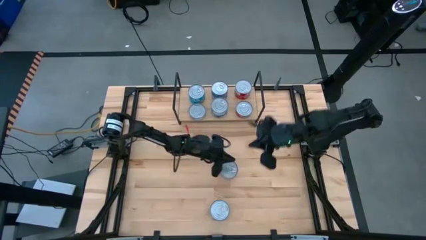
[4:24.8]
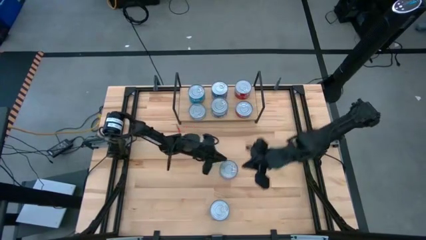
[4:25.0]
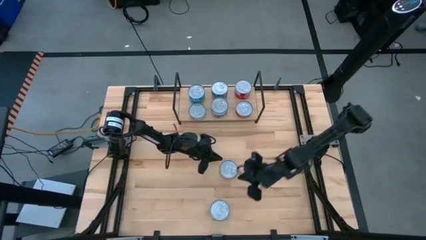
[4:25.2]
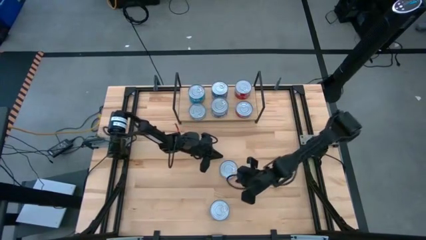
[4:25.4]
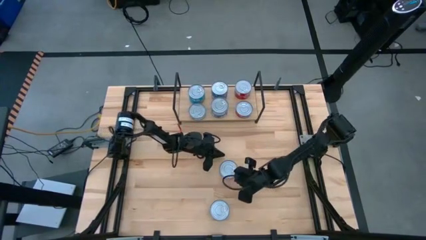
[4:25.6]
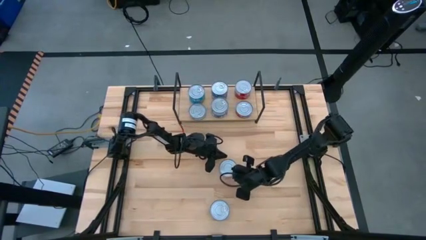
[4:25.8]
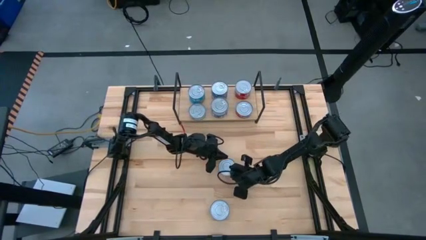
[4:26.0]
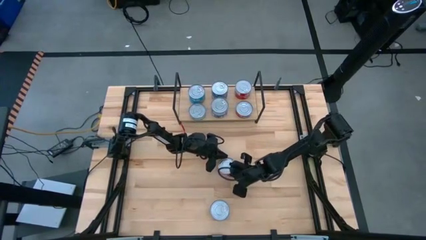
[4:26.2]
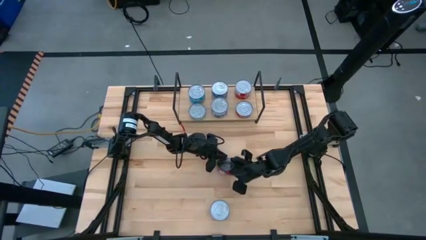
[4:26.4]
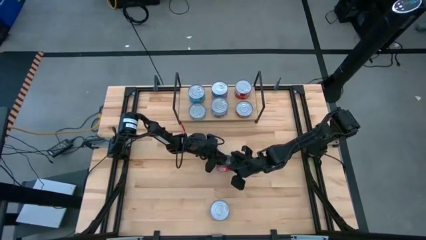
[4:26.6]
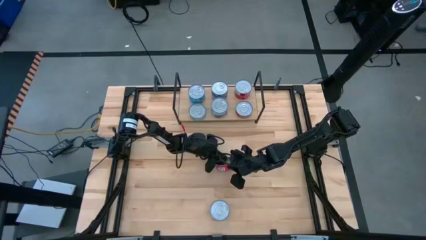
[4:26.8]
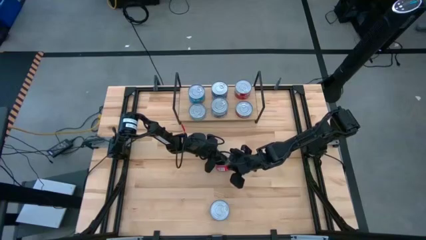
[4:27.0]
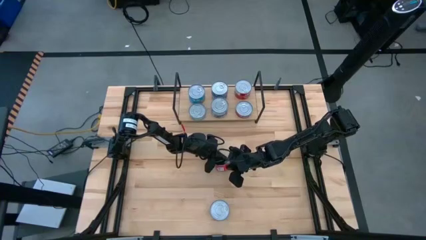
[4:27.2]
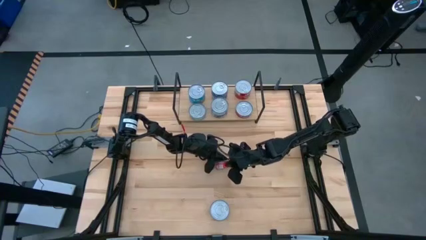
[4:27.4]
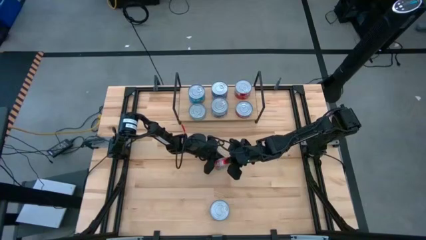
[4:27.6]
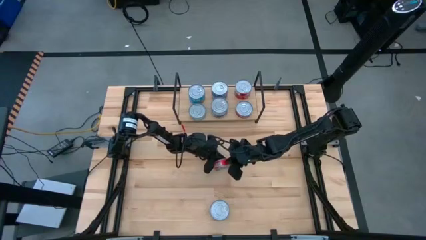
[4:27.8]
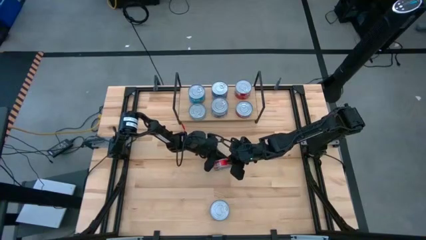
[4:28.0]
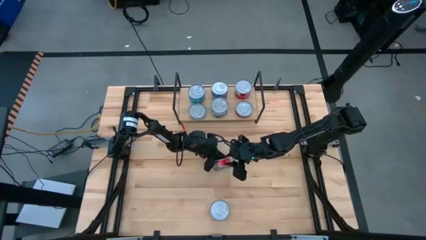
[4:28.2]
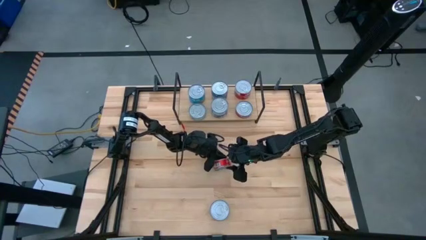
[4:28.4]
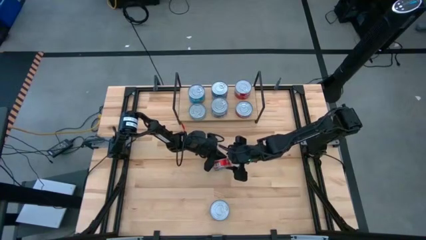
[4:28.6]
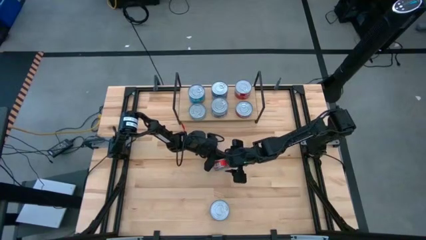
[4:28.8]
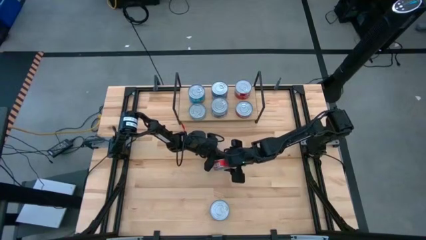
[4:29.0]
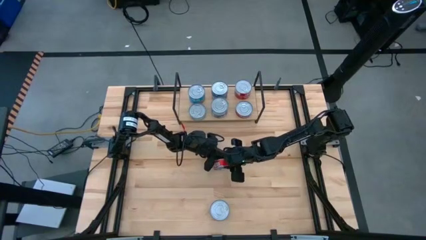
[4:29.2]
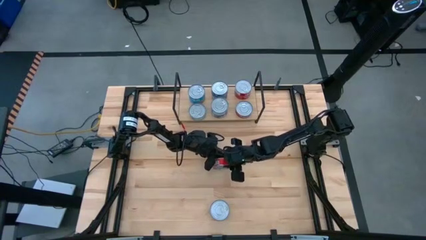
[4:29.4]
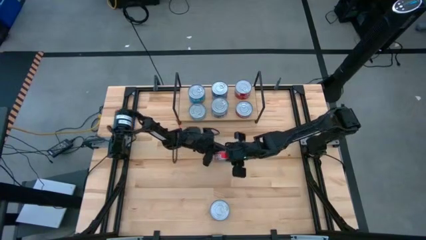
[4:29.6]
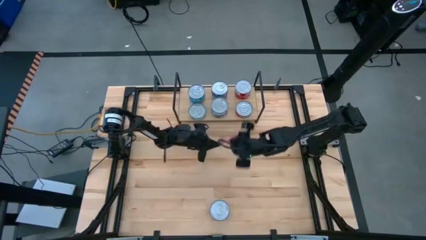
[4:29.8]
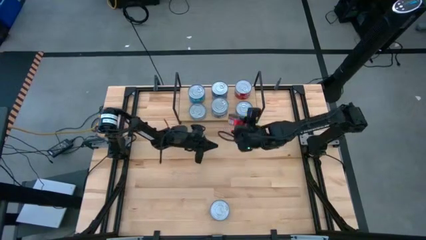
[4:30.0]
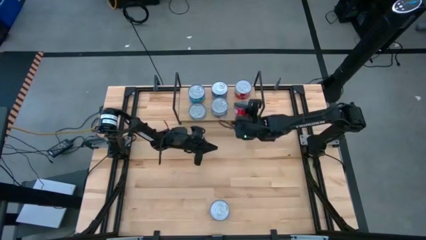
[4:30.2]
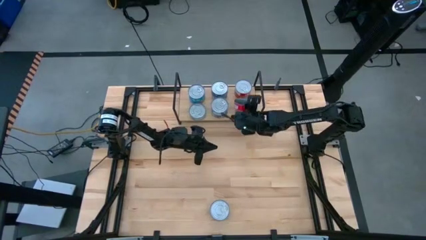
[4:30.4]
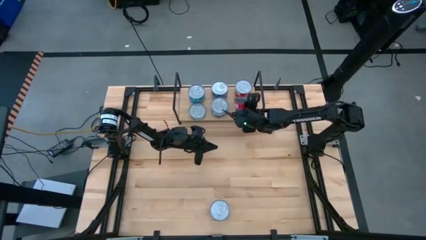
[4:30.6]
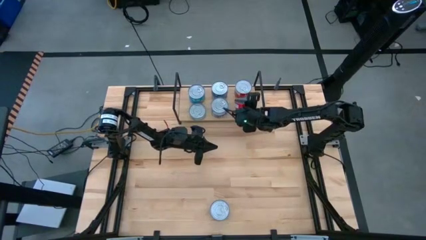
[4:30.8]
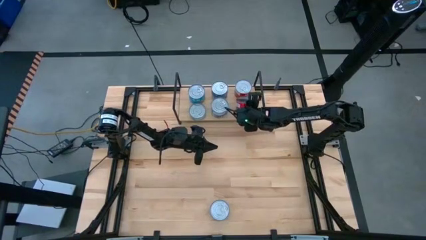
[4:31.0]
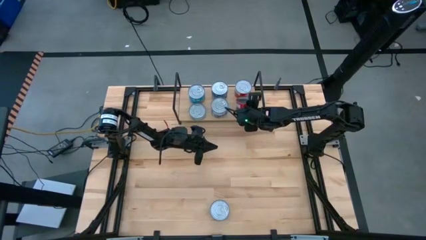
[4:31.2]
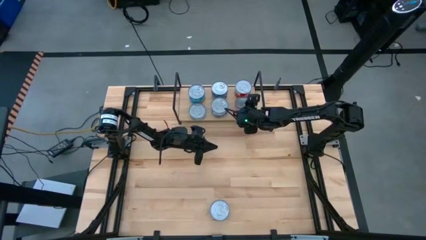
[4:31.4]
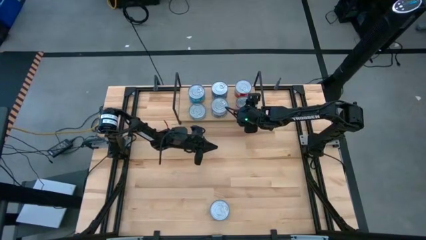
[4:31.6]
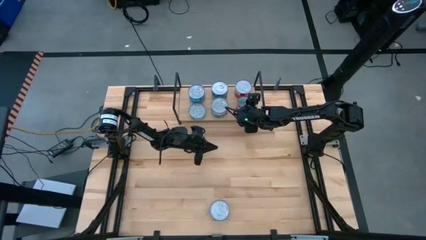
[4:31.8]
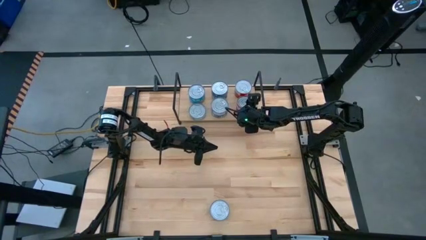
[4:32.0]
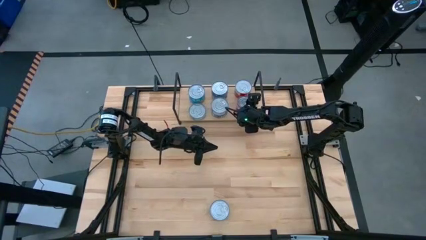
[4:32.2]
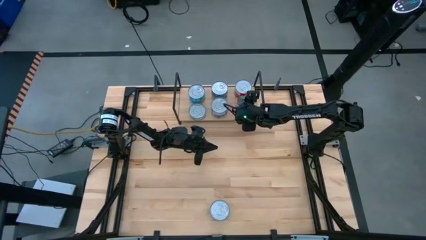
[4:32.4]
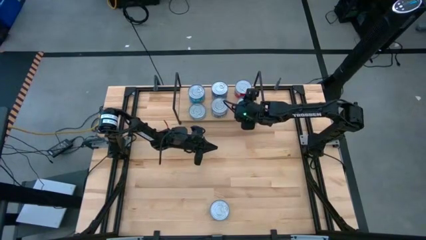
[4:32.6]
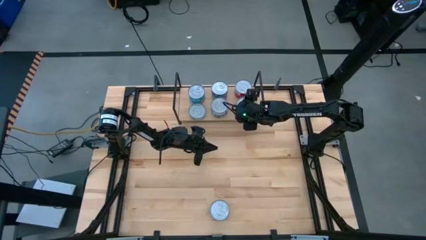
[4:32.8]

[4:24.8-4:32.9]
Task: Stack canned seafood by type on shelf
Stack the center red tuna can on the top of the other red tuna can on the shelf

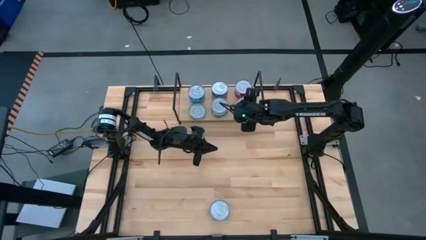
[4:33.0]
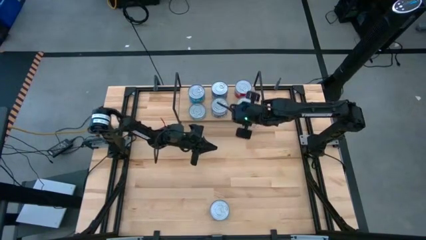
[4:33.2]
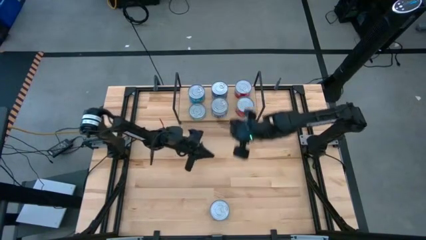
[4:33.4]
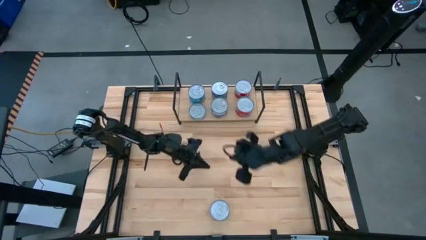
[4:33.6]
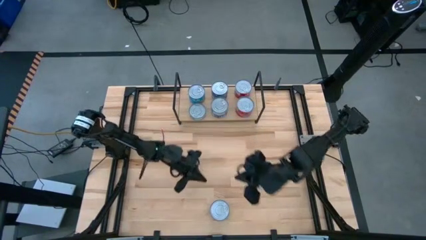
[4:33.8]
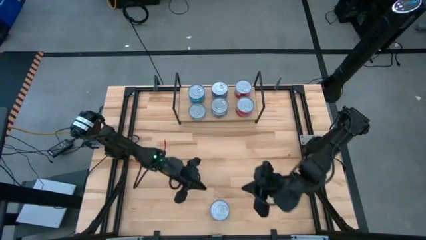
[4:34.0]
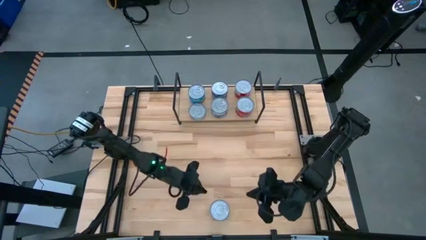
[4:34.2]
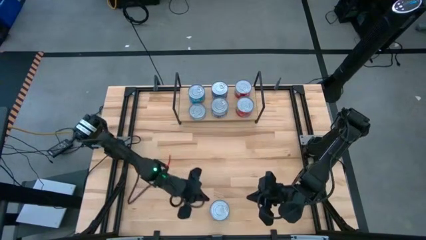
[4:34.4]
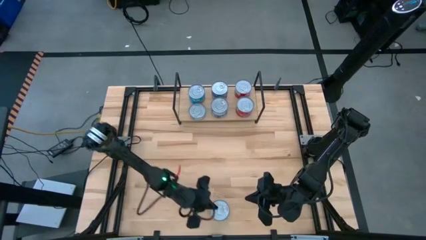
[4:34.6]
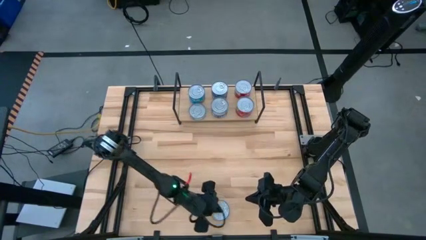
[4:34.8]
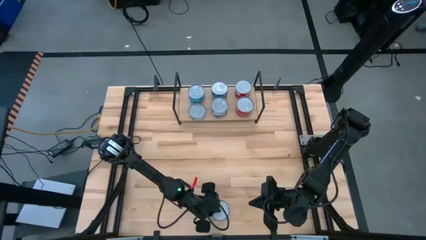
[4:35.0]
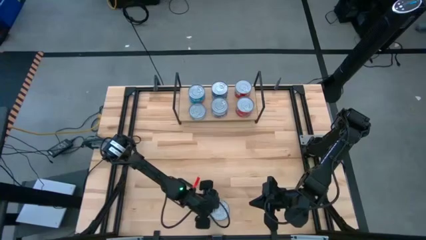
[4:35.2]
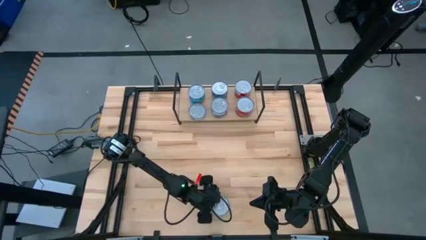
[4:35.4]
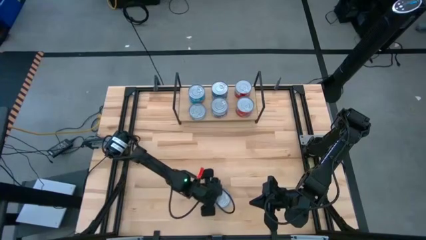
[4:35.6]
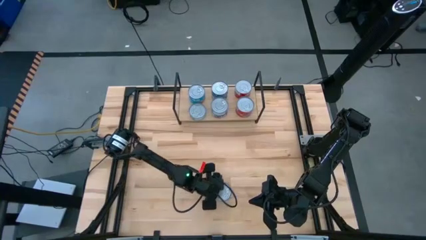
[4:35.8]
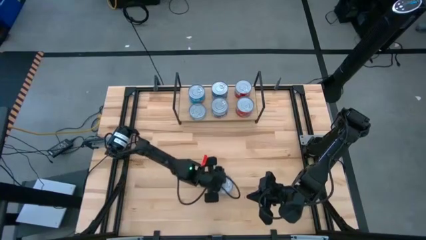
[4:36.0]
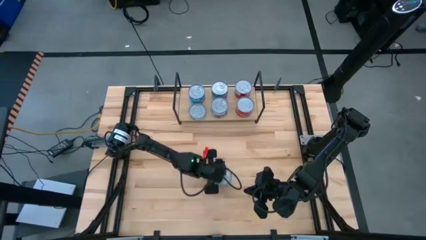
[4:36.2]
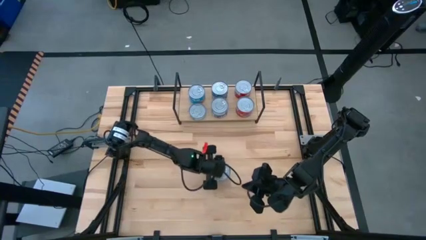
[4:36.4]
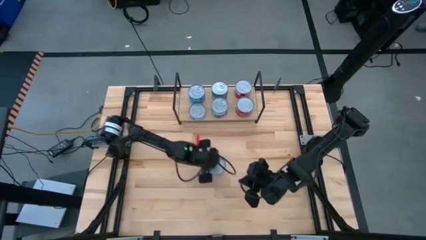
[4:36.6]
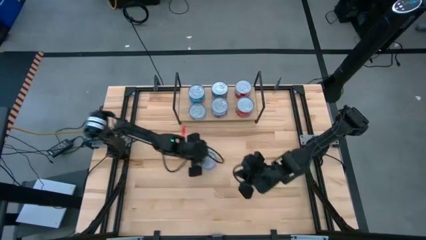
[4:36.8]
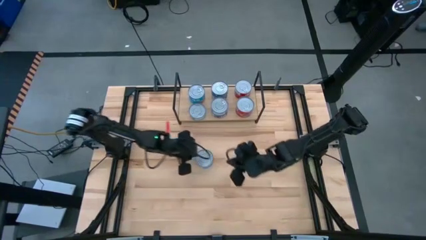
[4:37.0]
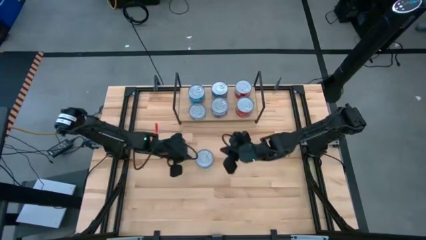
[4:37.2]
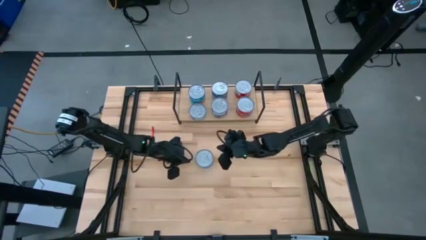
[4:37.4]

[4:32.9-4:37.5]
Move the bottom middle light blue tuna can to the center of the table

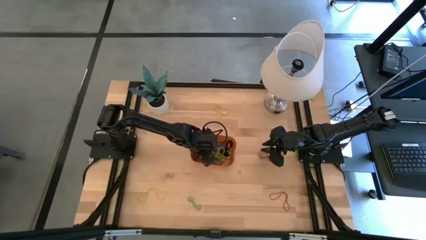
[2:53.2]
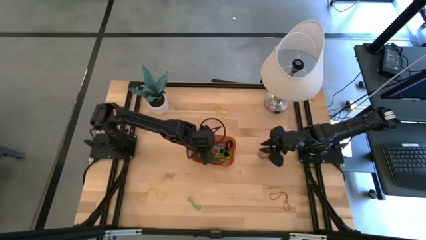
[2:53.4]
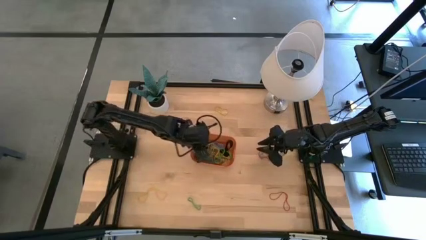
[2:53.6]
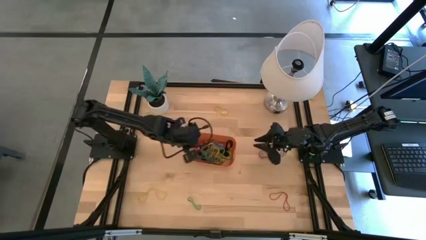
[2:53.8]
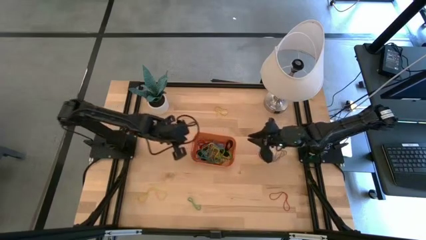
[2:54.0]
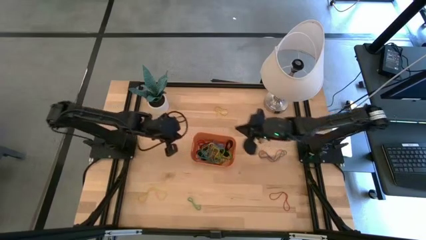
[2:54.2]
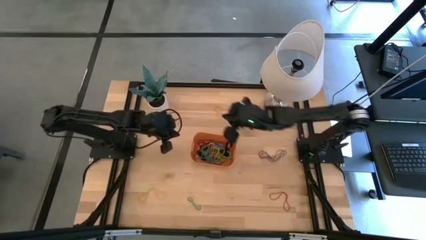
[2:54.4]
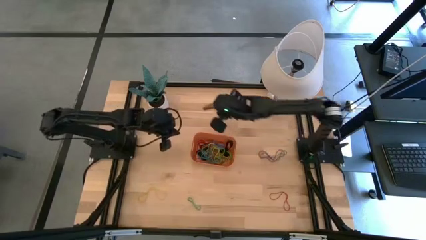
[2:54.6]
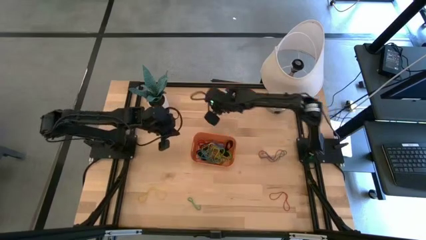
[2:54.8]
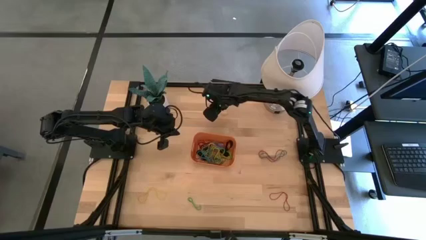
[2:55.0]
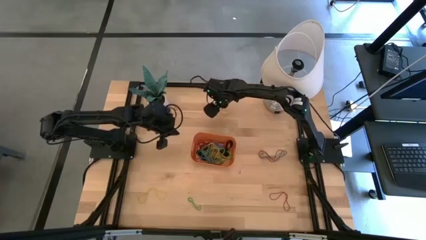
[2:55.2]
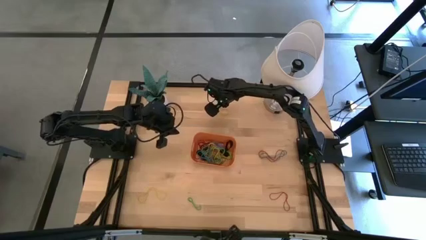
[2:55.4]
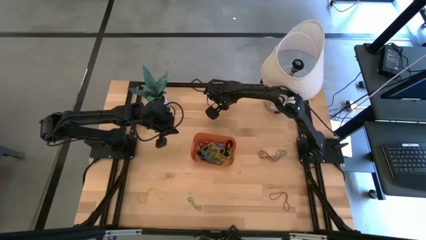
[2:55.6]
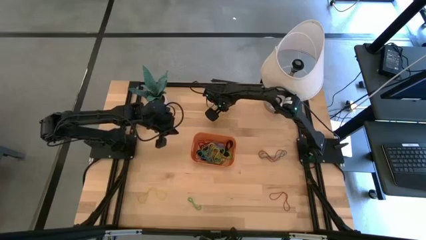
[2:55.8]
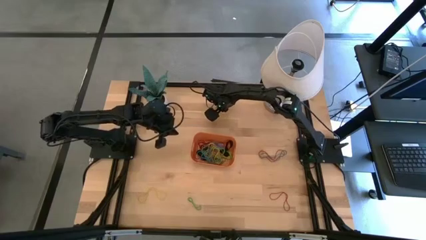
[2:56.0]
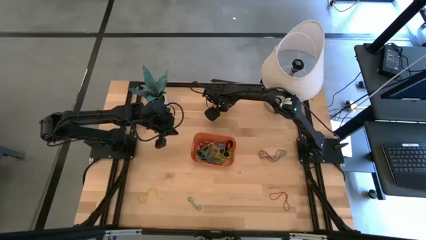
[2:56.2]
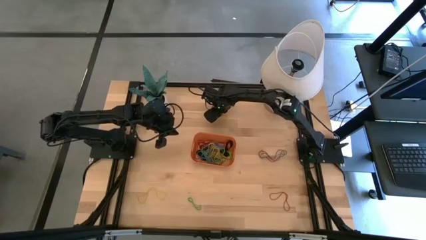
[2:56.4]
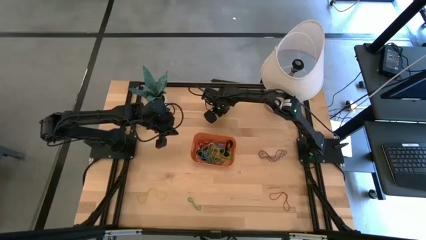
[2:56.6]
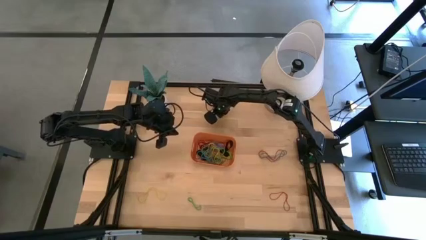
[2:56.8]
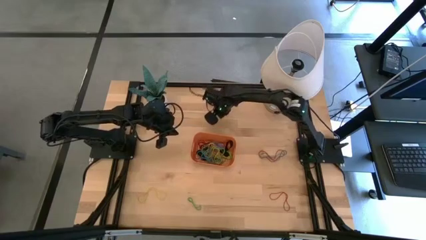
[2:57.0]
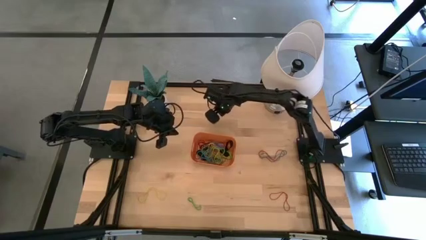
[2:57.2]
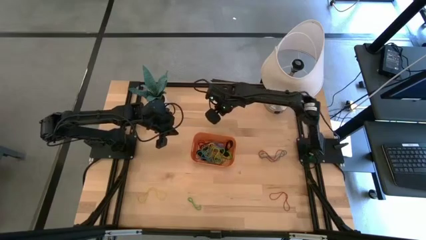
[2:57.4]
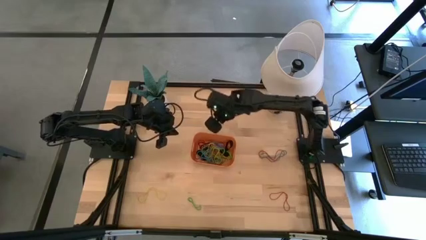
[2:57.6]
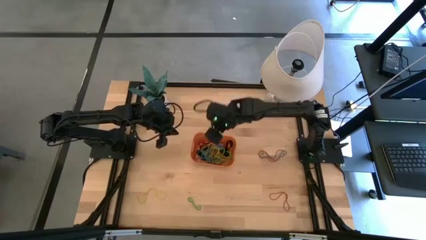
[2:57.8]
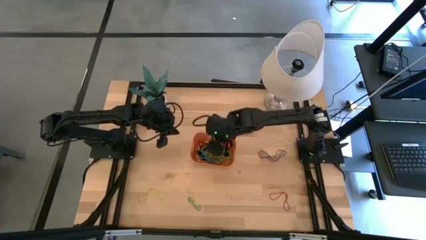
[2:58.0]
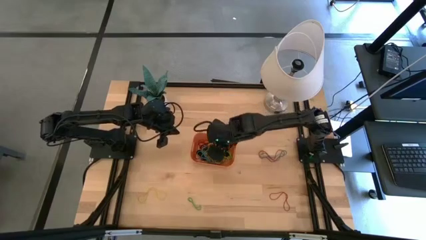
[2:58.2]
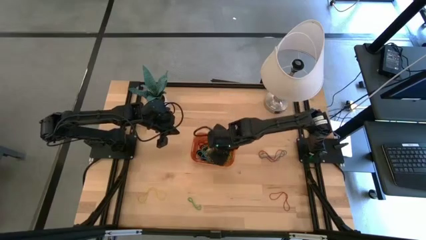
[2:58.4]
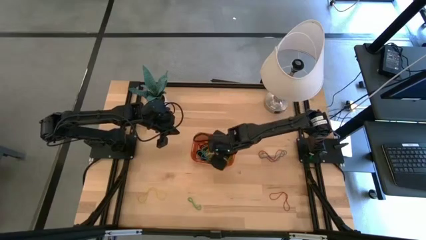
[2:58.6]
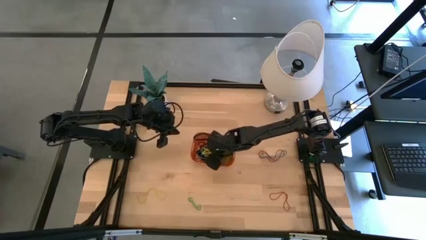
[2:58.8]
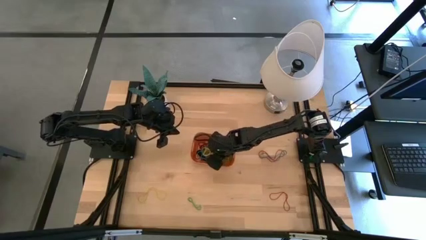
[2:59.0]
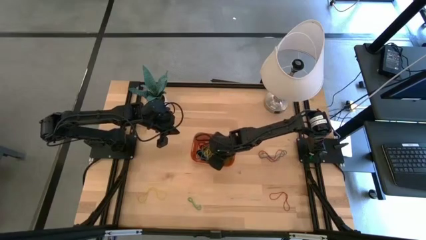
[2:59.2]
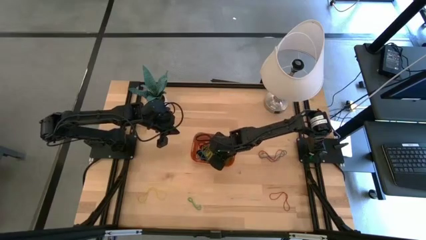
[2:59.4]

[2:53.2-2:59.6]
Task: Pick and place rubber bands into bin
Put the yellow rubber band into the orange bin
